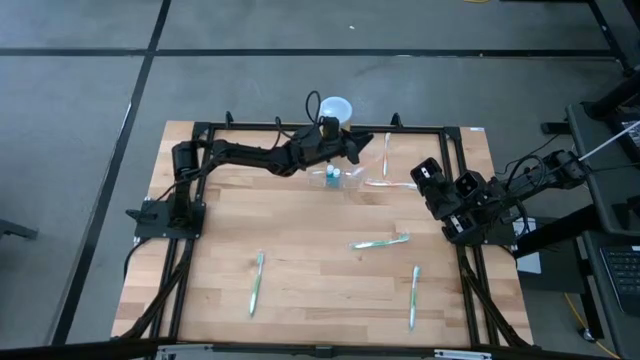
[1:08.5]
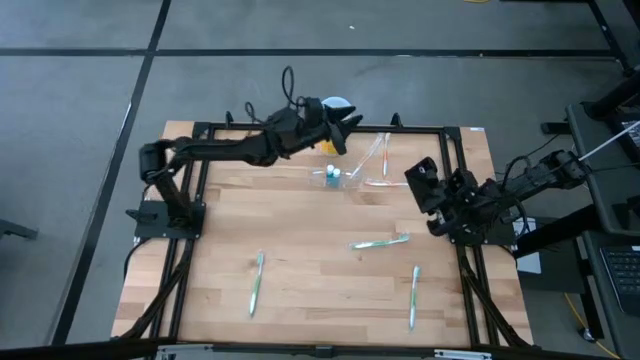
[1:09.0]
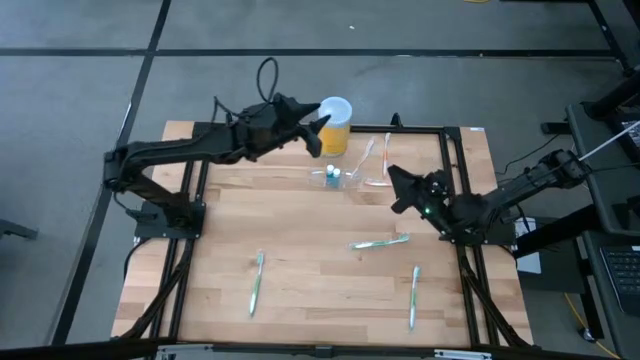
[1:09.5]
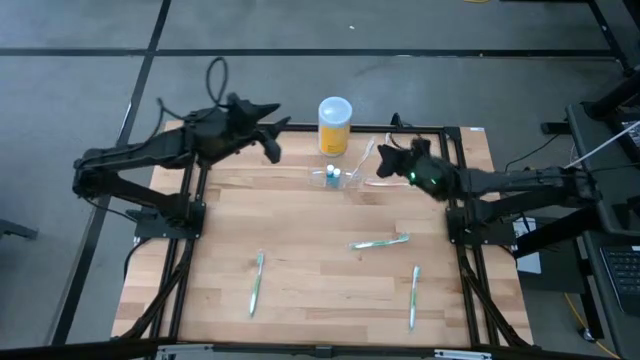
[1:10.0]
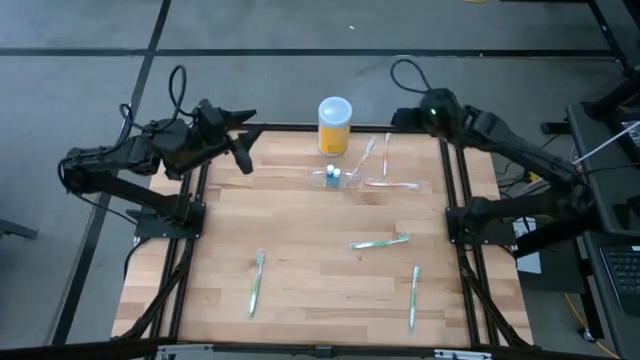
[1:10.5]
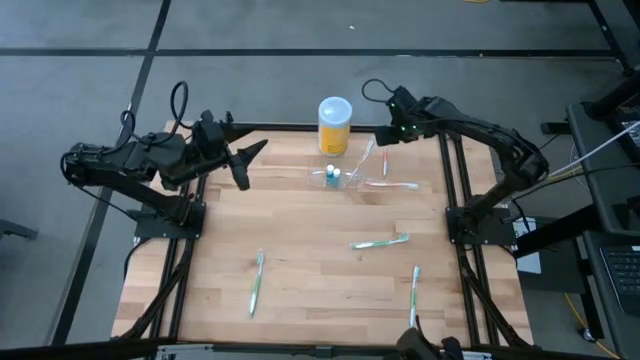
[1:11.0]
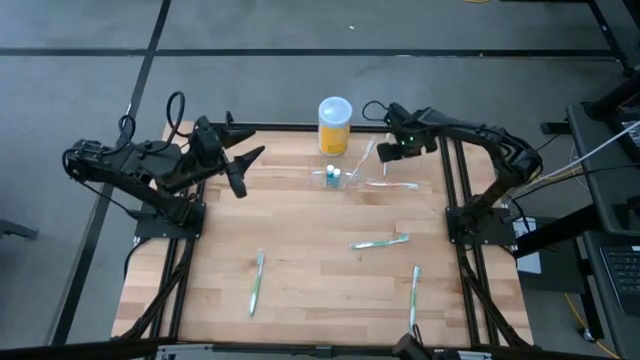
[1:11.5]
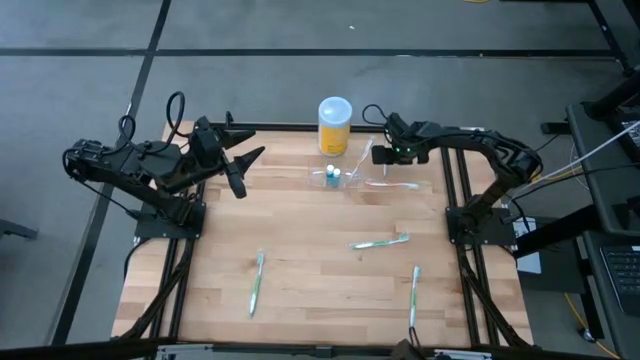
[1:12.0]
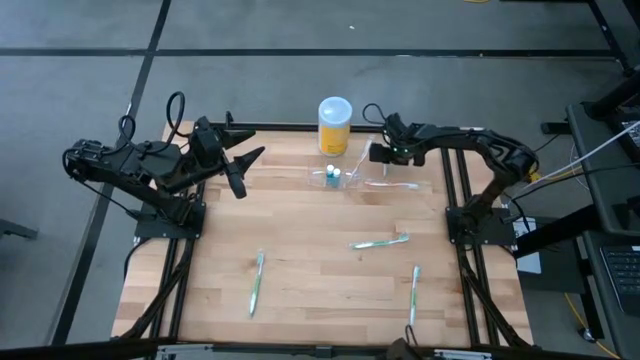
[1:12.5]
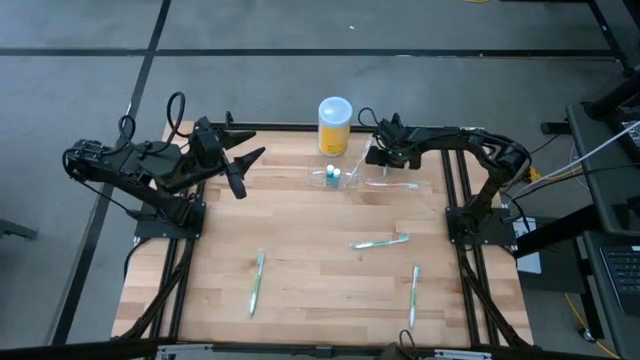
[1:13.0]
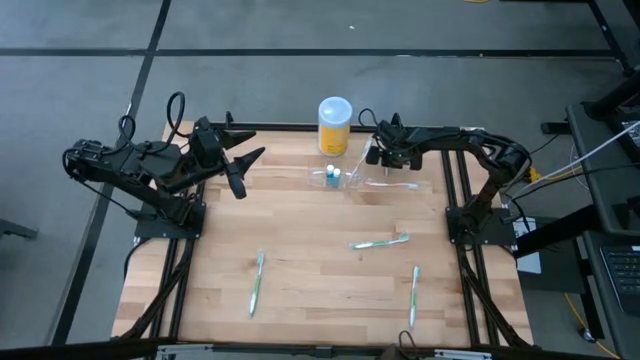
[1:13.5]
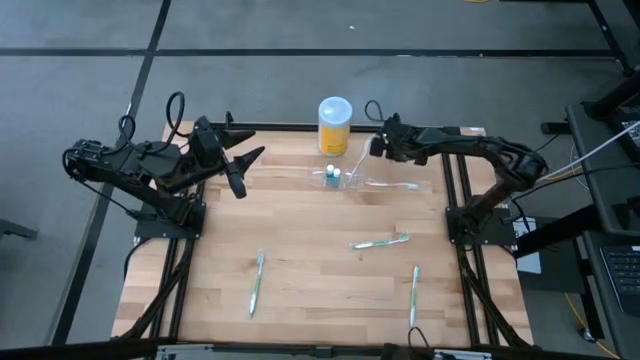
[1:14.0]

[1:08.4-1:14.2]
Task: Pick & Place toothbrushing station
Put the top orange toothbrush into the transparent organizer

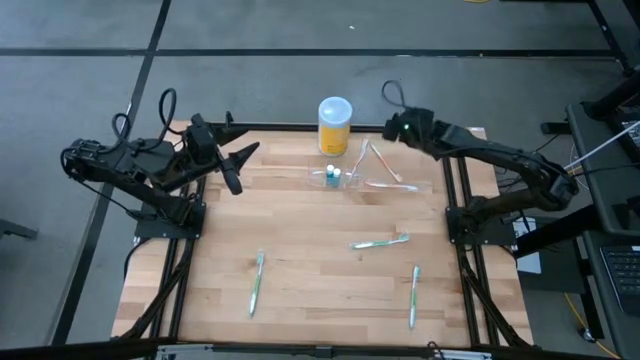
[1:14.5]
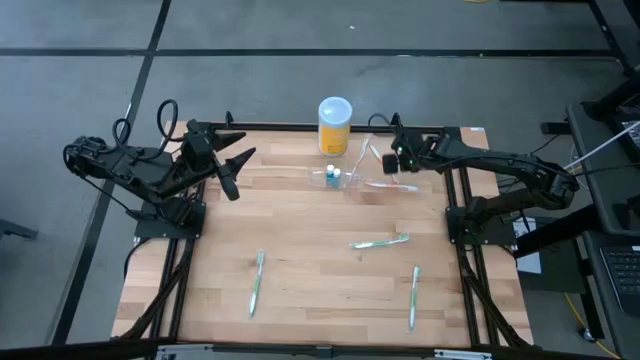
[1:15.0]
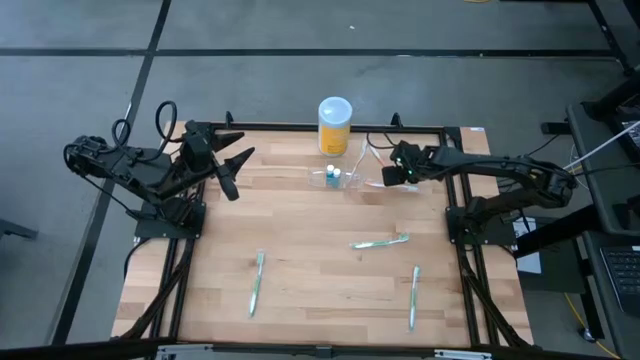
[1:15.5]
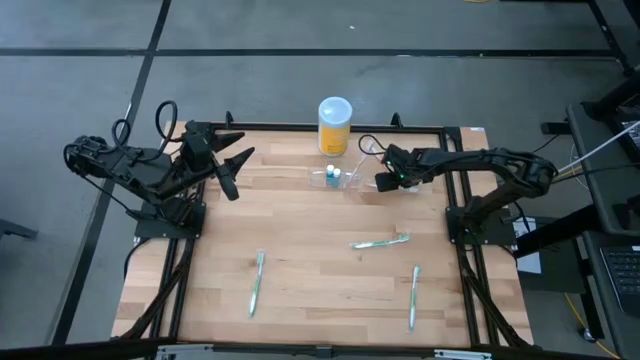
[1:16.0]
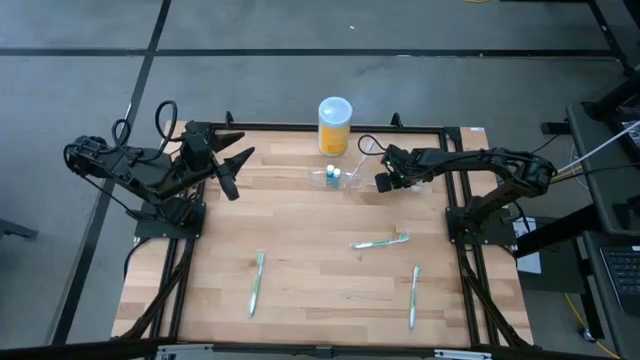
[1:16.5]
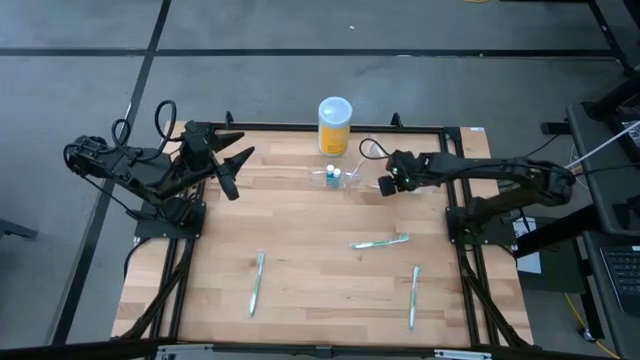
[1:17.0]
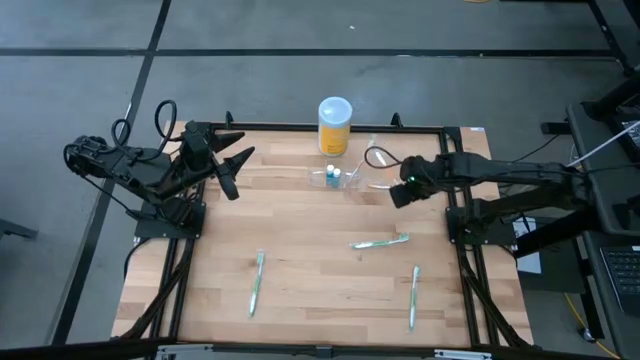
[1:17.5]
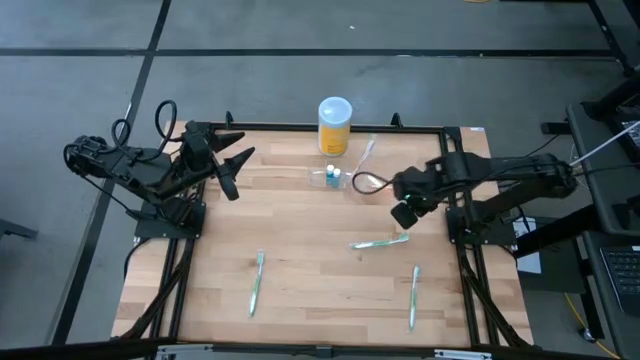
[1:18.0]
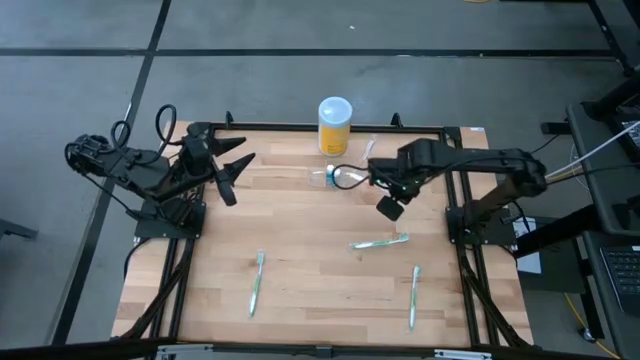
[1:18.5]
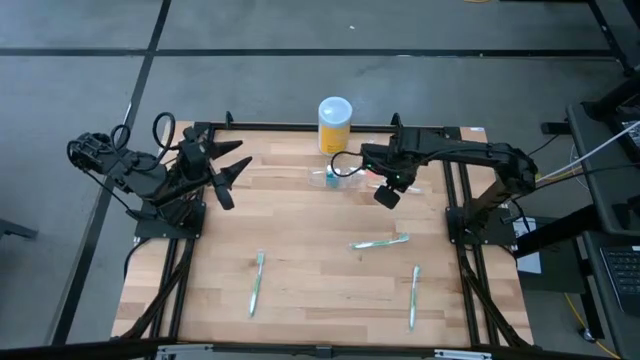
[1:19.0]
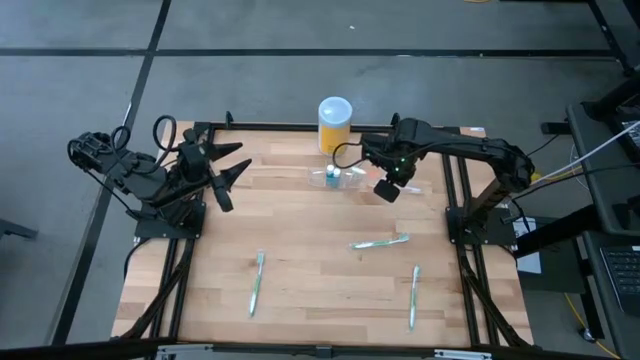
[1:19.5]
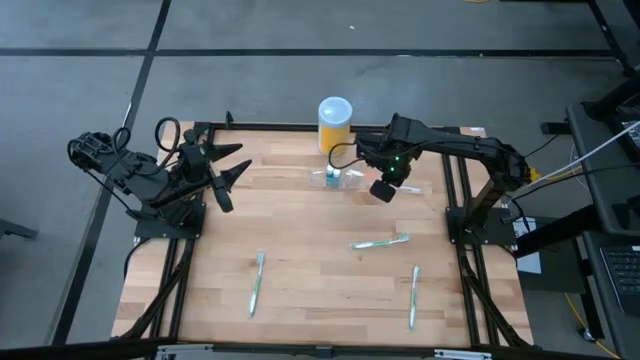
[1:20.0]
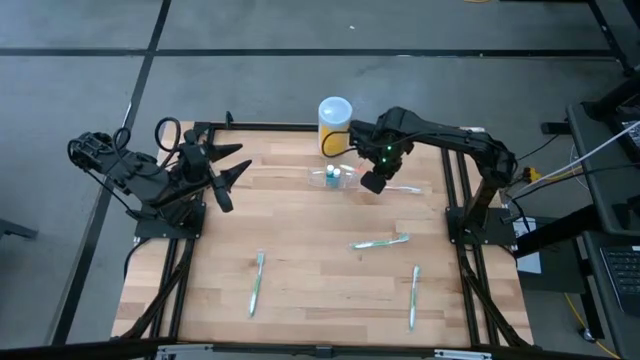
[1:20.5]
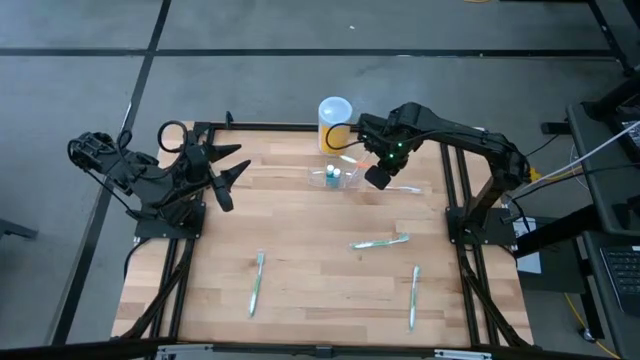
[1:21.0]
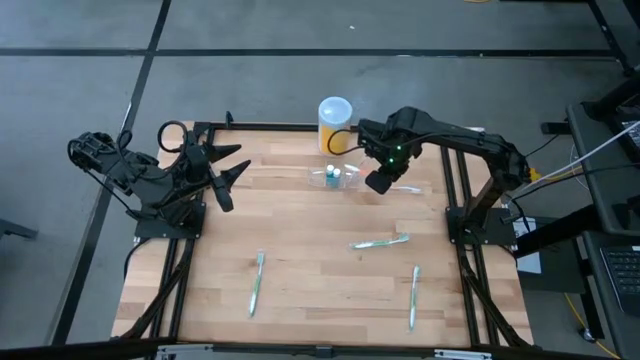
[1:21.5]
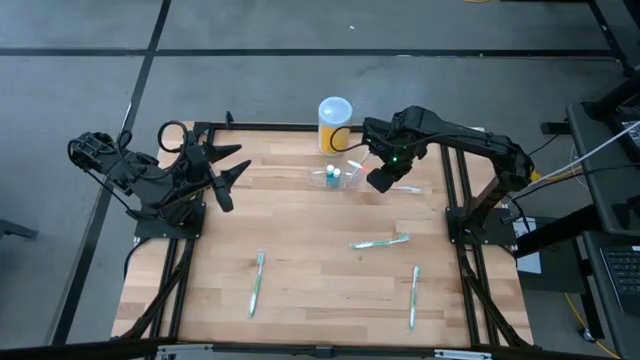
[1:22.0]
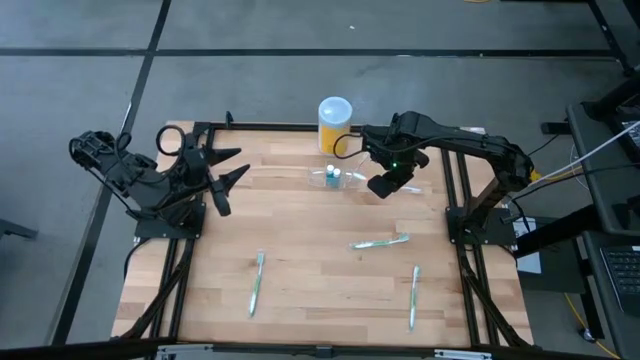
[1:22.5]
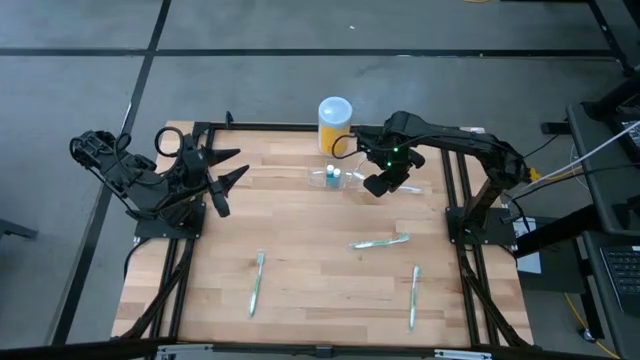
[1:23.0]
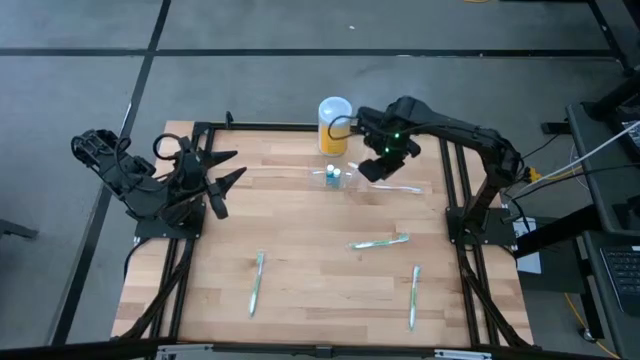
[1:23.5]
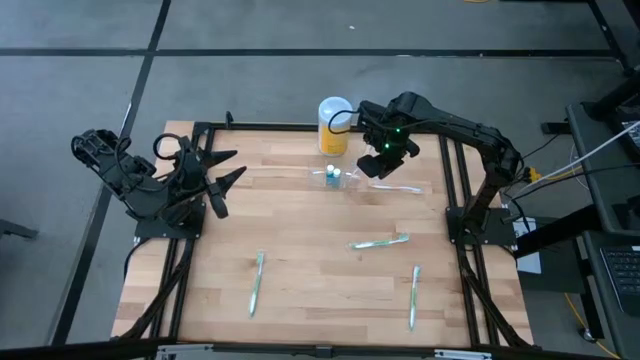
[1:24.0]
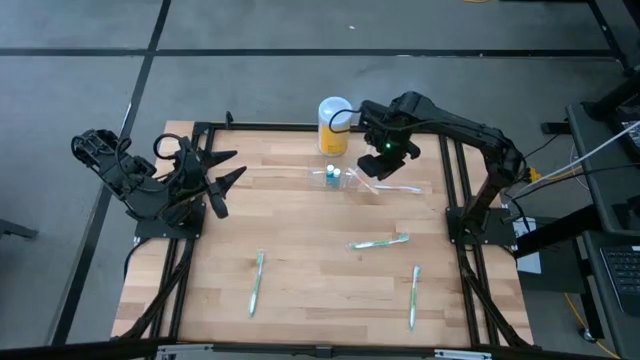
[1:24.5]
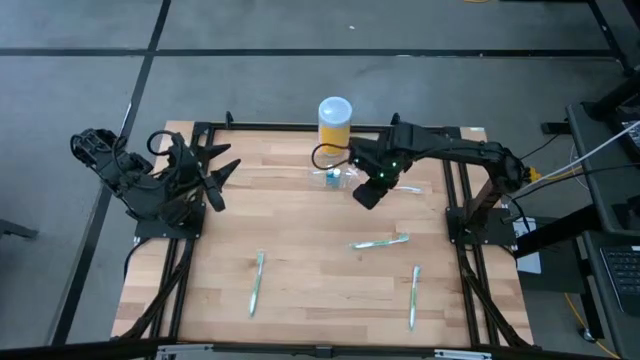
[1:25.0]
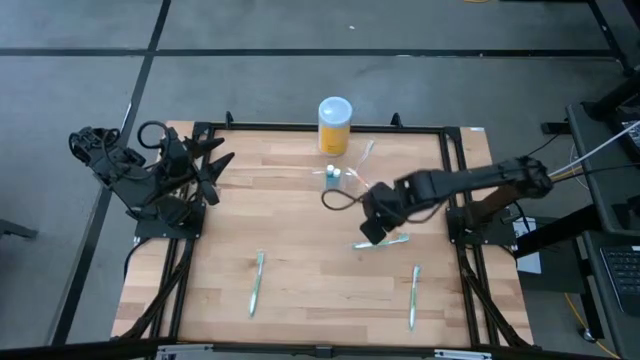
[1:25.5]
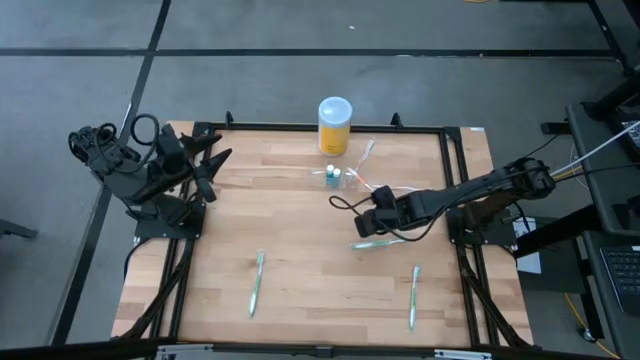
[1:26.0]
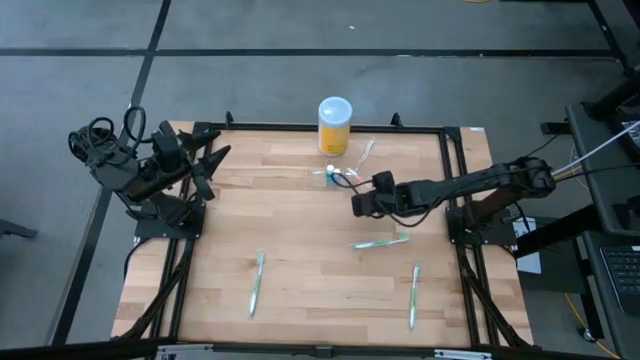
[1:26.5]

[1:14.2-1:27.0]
Put the top orange toothbrush into the transparent organizer
